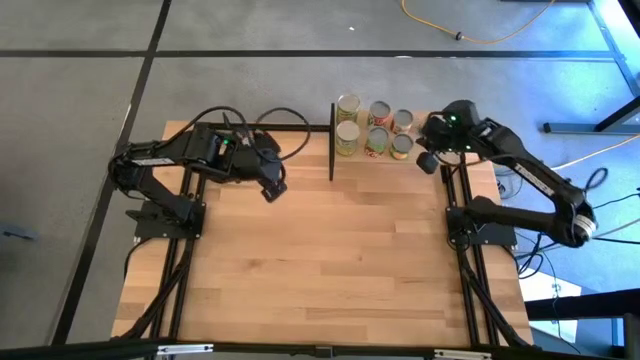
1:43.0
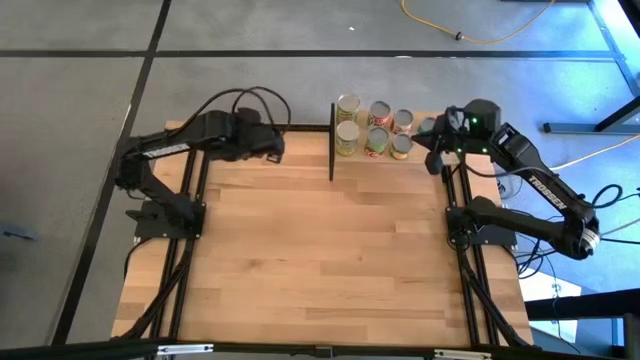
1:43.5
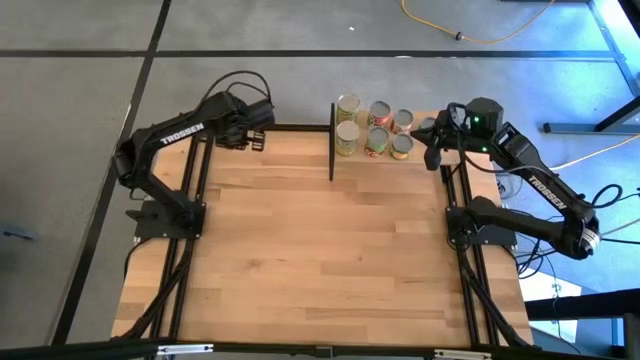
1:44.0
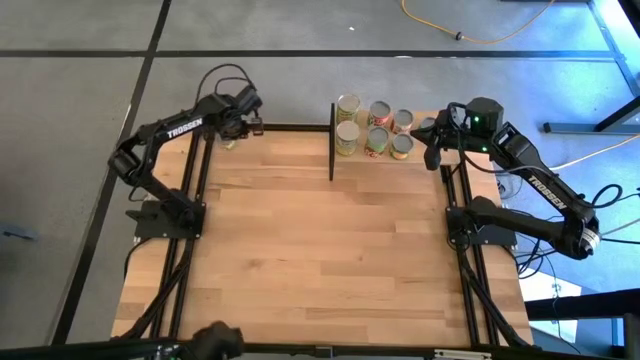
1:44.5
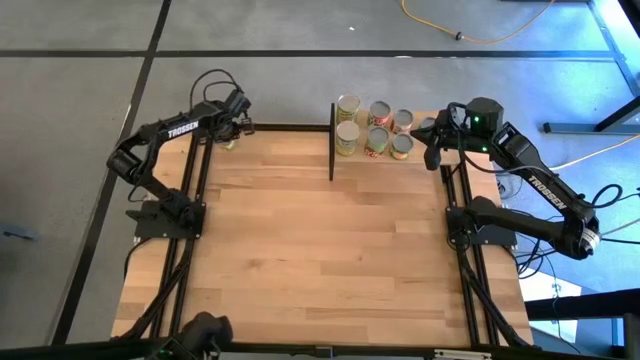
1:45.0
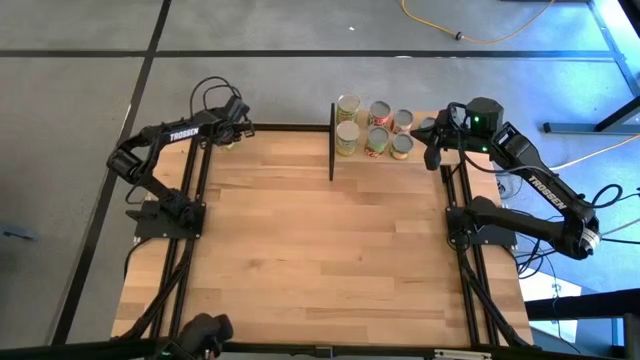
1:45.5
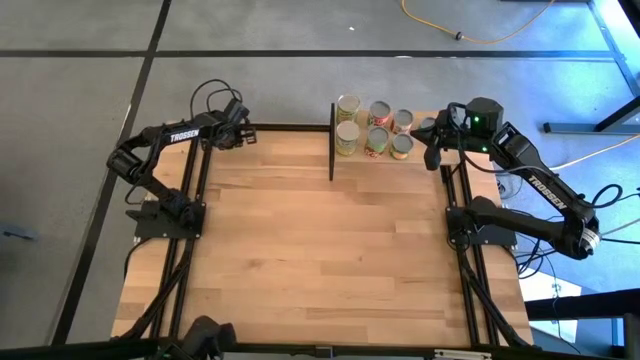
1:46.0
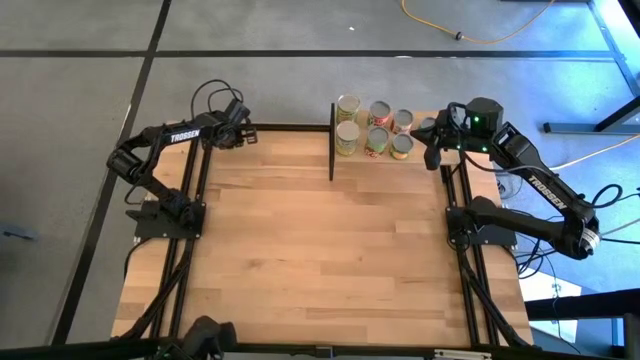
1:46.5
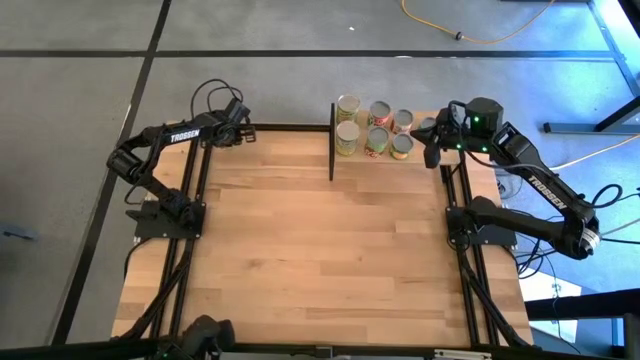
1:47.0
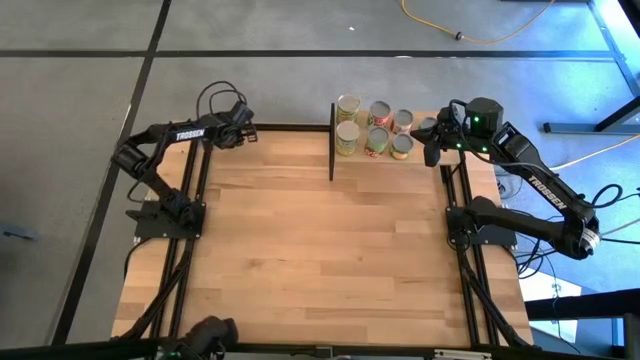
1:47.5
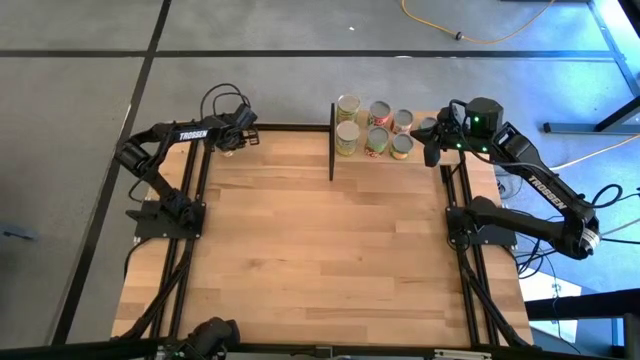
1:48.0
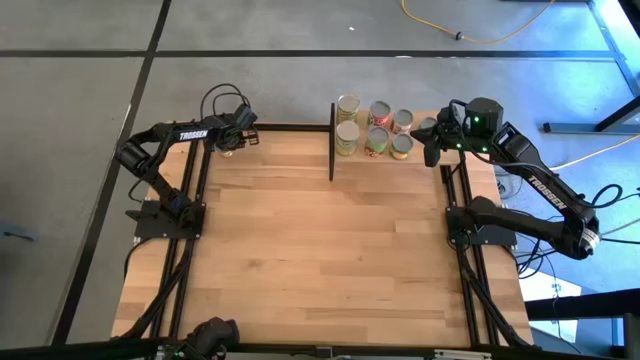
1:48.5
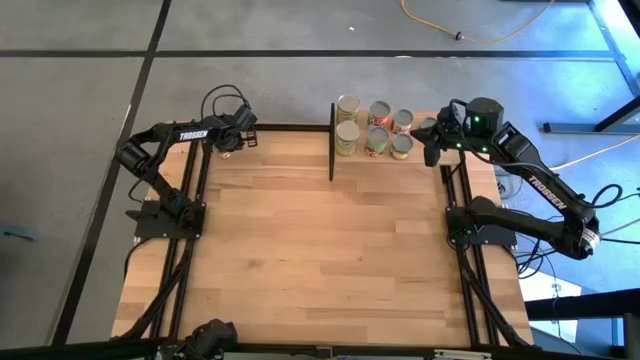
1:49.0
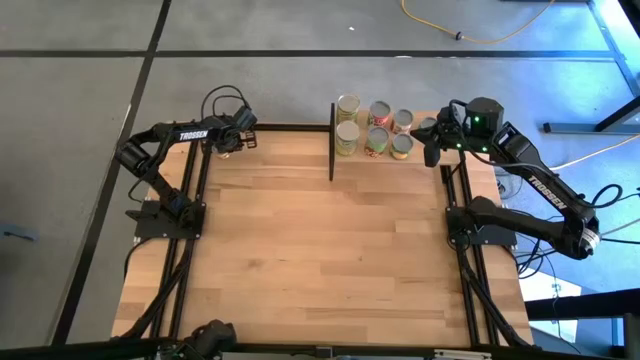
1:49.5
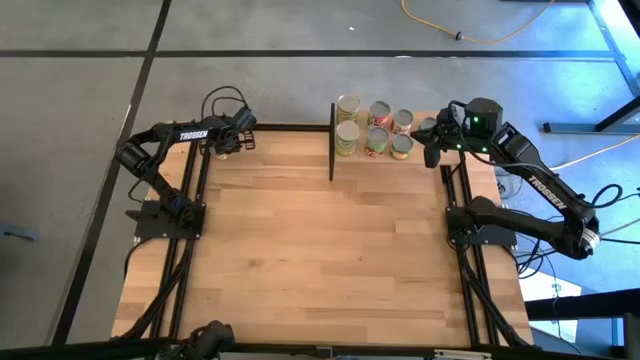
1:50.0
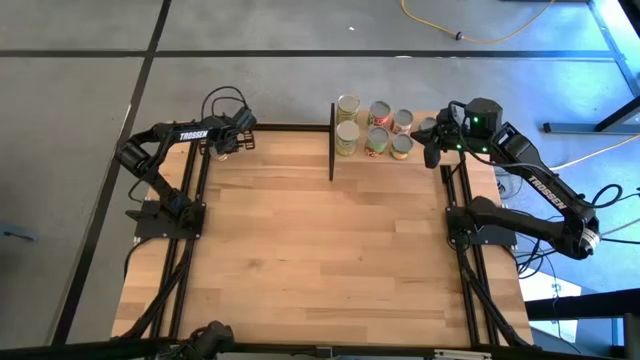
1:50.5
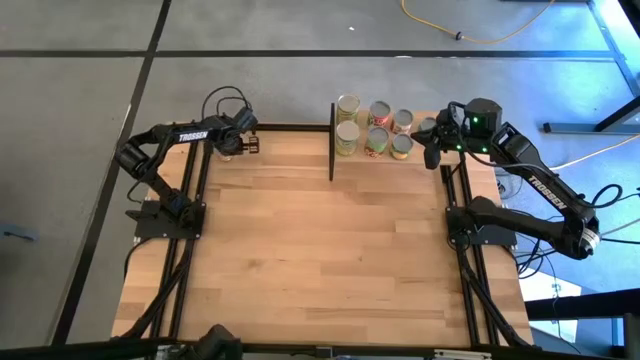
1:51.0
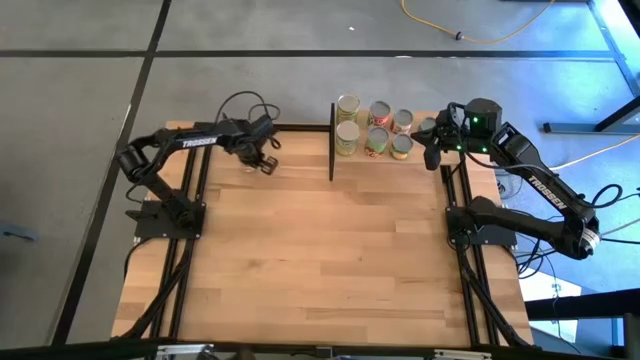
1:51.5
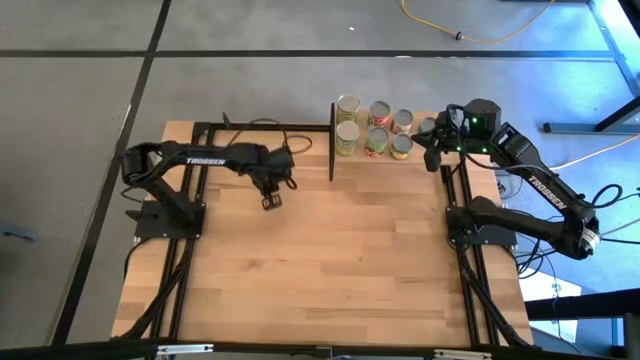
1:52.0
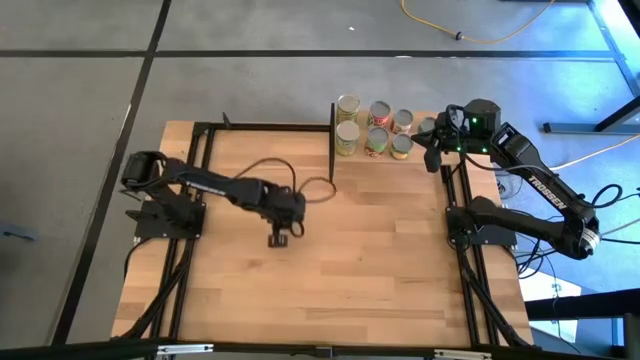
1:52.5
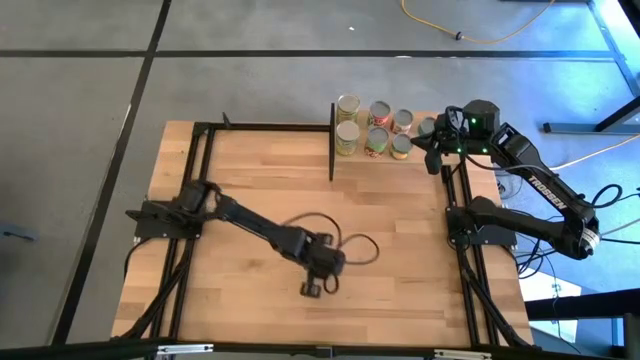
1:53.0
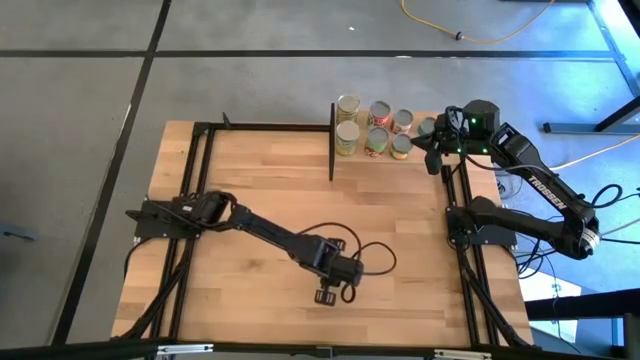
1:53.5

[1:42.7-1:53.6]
Task: Pick and place cans onto a shelf
Move the green and yellow can to the middle of the table

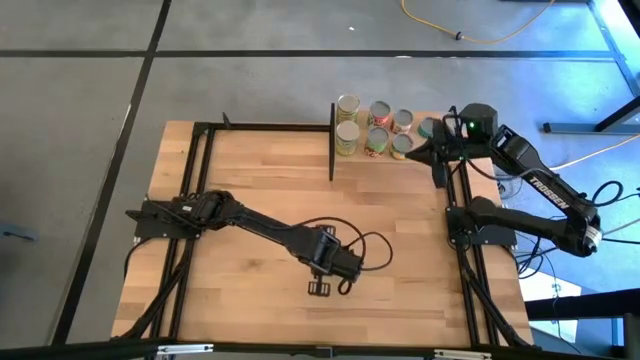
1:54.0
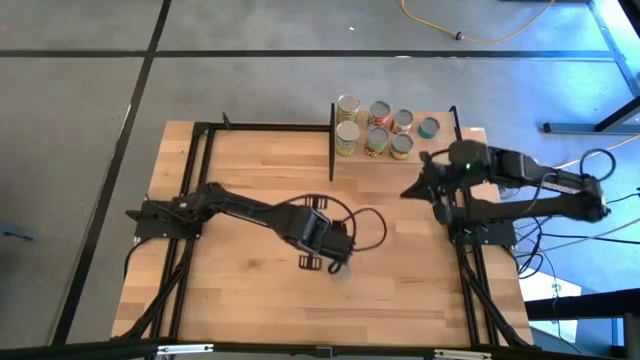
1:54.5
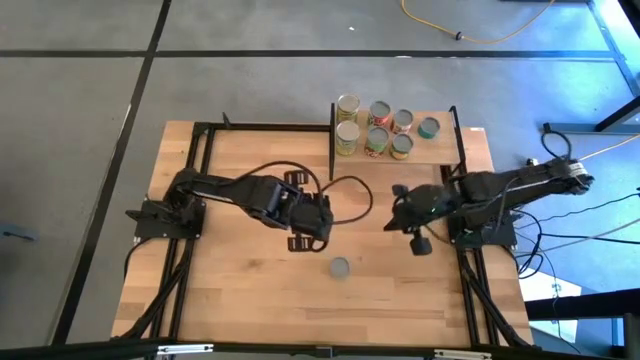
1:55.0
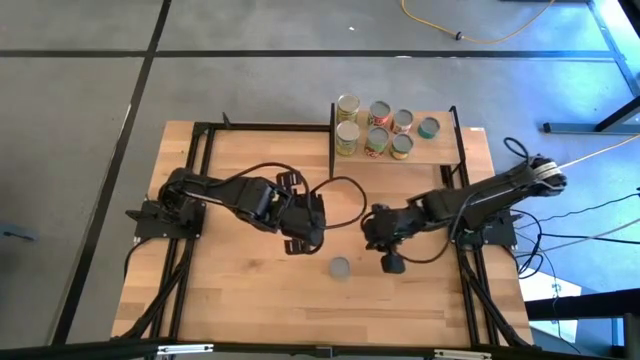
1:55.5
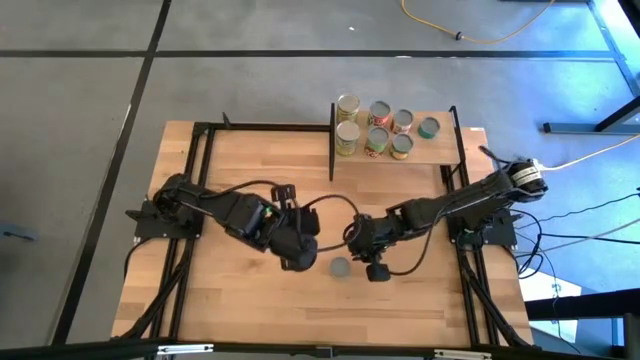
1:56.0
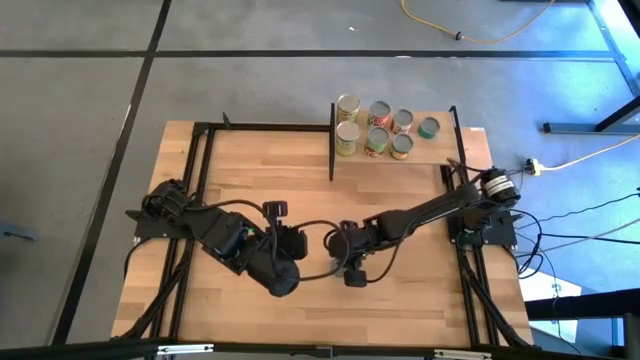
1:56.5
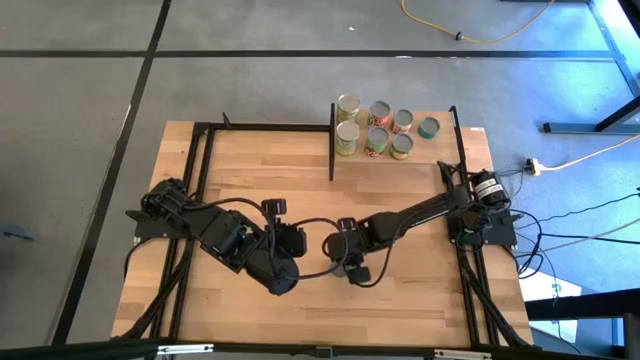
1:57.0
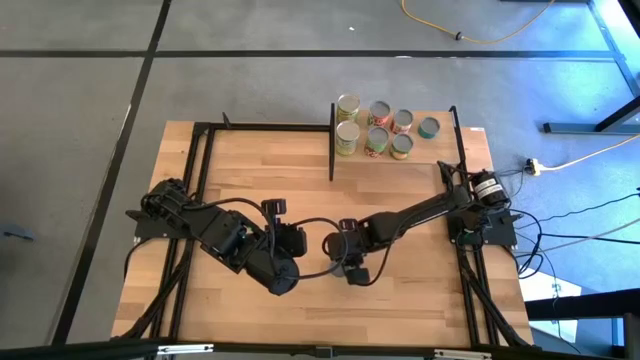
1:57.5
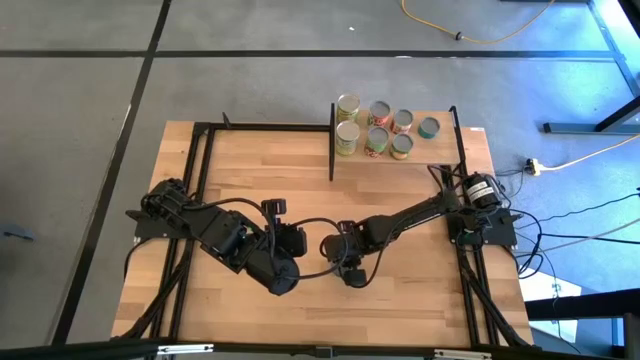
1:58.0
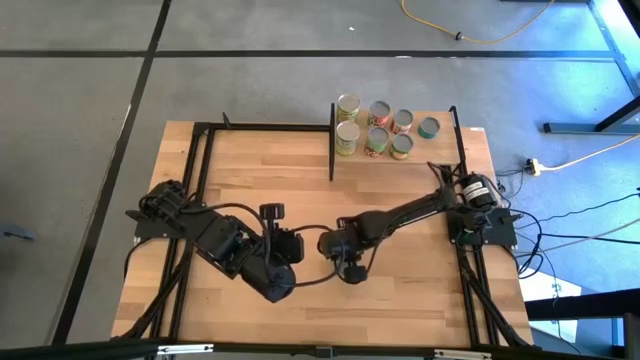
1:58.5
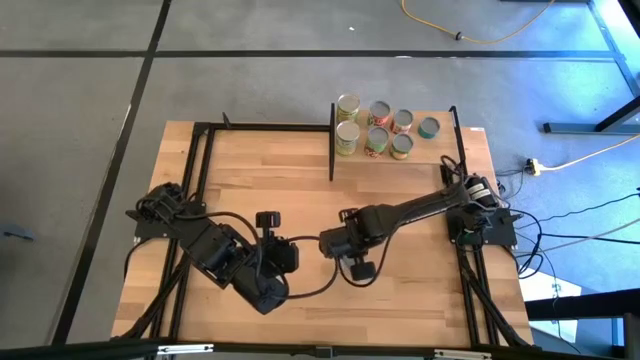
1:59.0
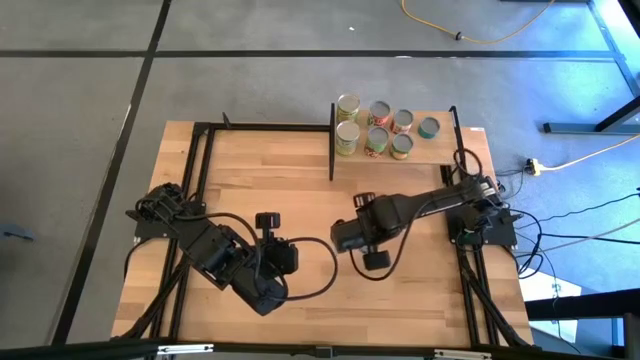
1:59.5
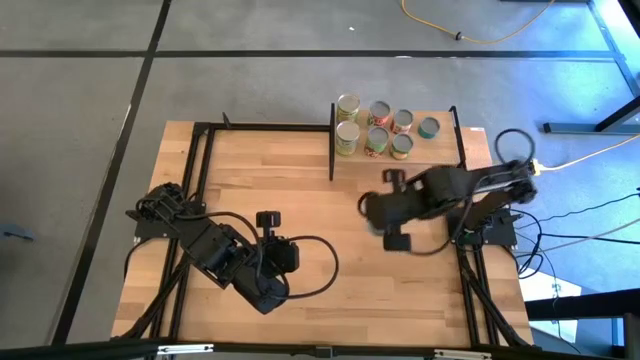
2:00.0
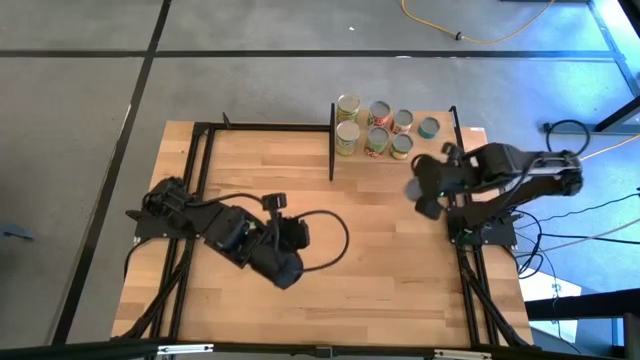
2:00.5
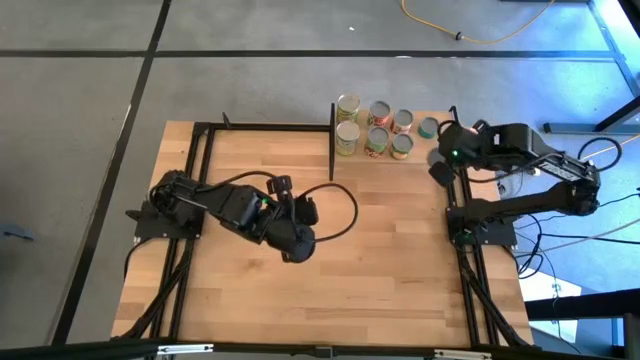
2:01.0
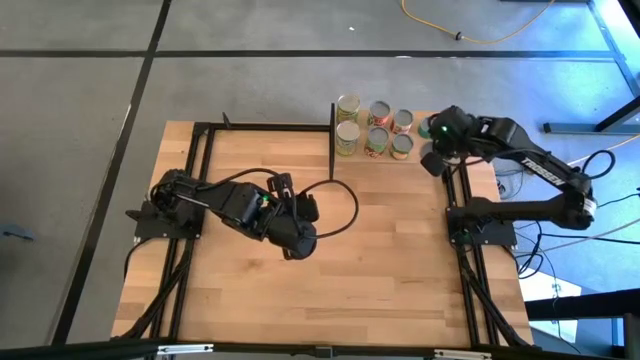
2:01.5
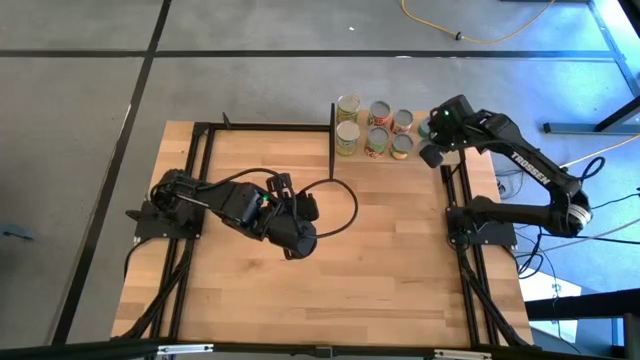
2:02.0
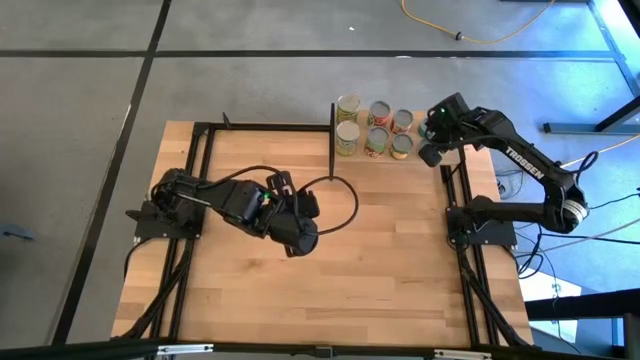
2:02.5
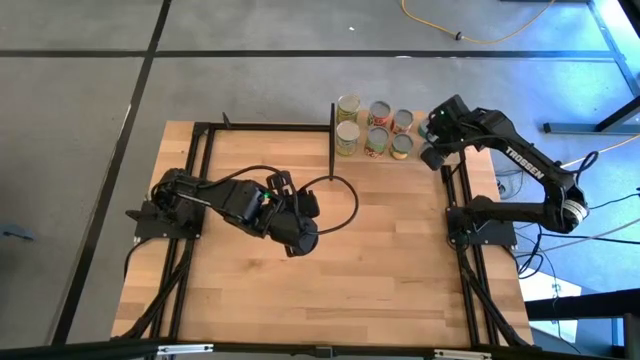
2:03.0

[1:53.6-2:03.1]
Put the green and yellow can on the shelf

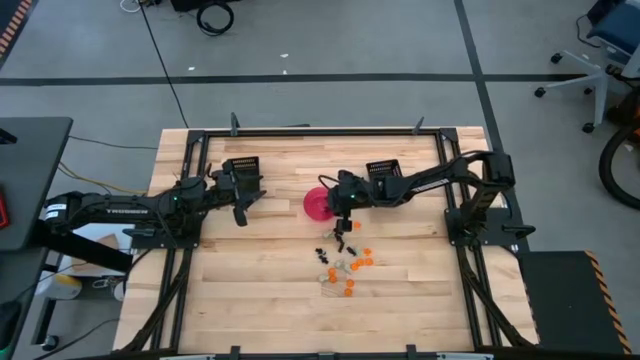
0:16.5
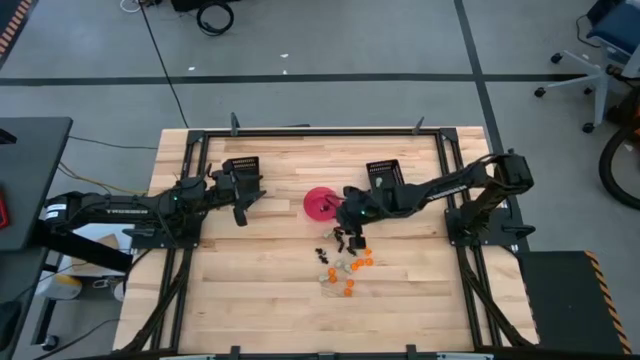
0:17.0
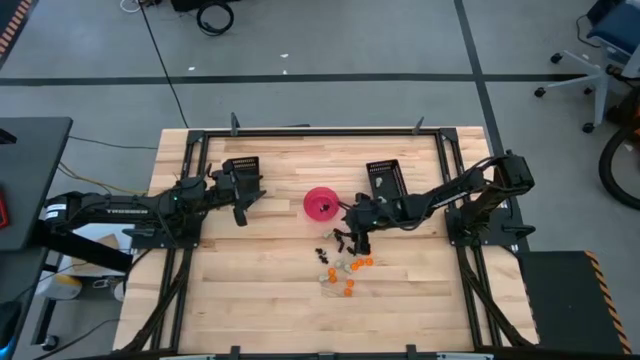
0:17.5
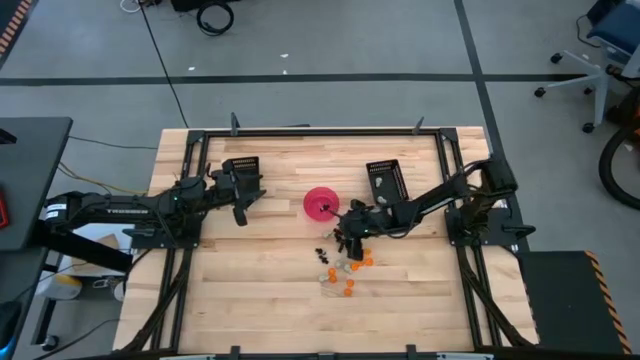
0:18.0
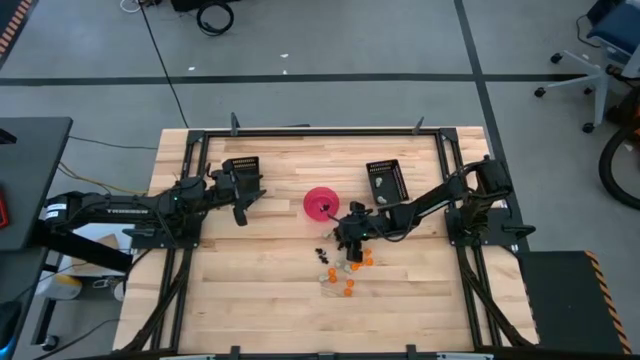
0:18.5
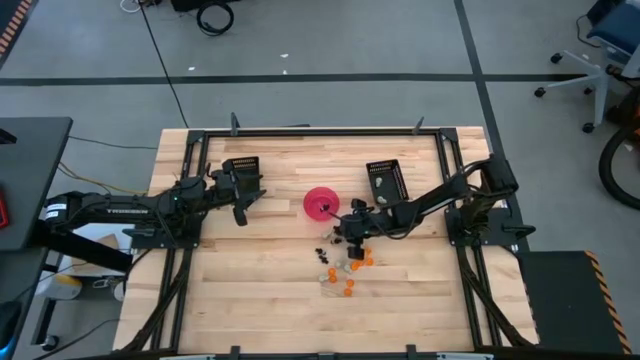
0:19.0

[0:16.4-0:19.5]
Task: Sort Halloween decoration
Put the black skeleton toy into the pink bin
